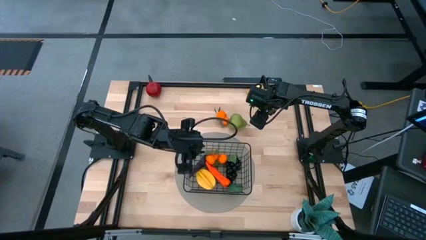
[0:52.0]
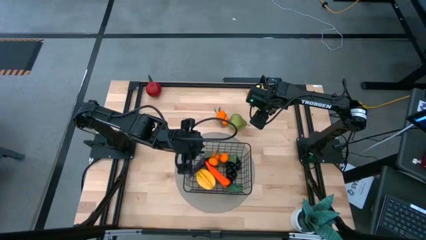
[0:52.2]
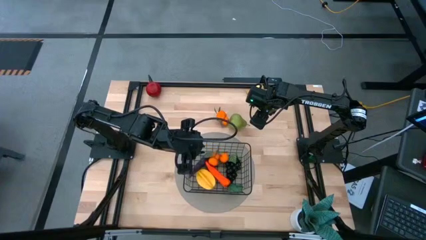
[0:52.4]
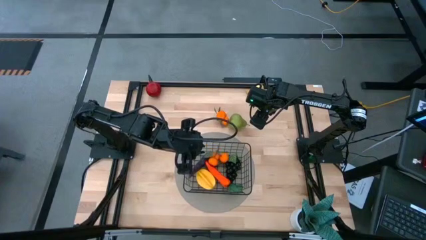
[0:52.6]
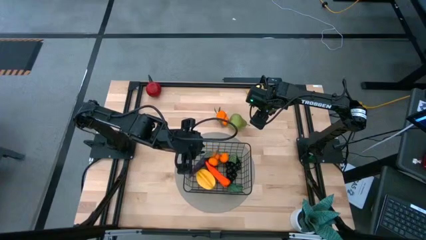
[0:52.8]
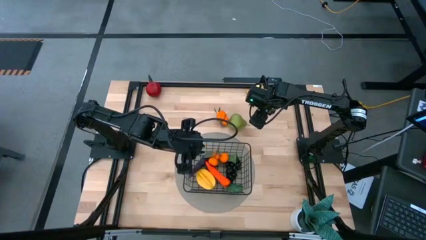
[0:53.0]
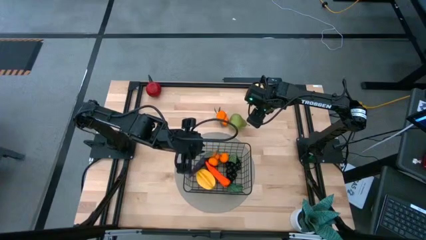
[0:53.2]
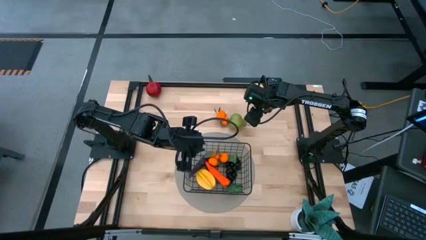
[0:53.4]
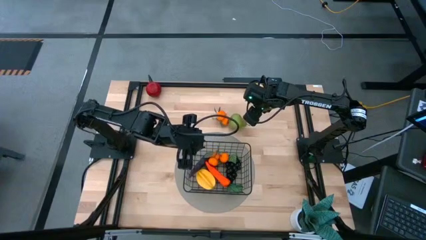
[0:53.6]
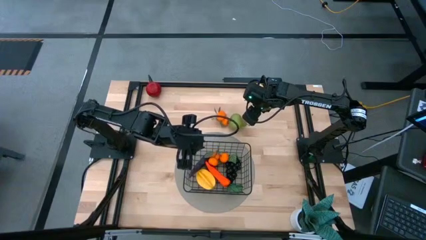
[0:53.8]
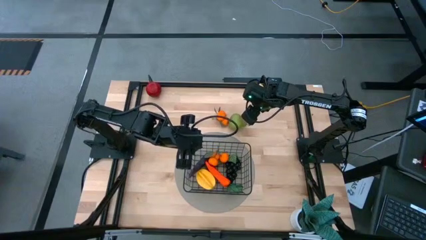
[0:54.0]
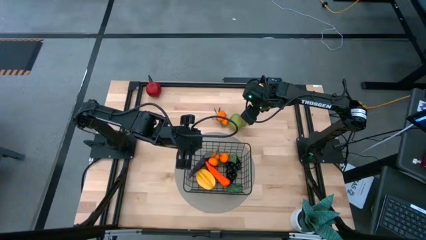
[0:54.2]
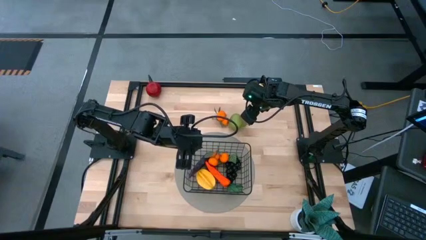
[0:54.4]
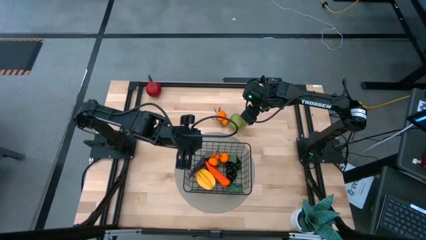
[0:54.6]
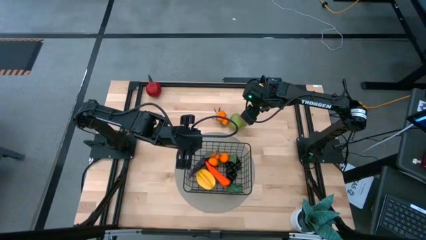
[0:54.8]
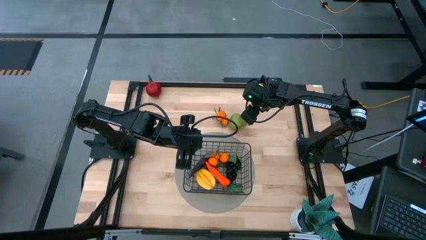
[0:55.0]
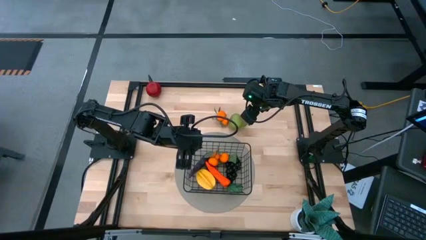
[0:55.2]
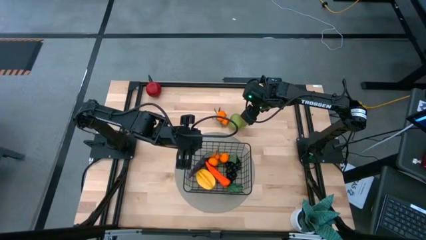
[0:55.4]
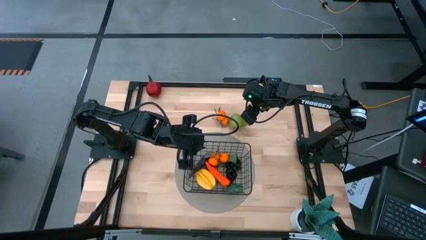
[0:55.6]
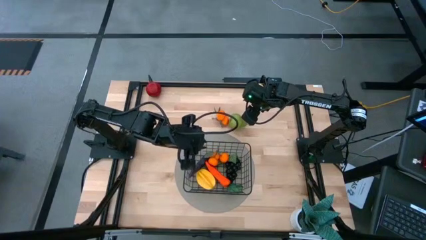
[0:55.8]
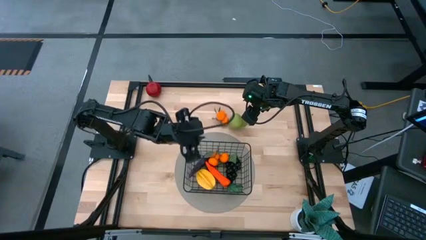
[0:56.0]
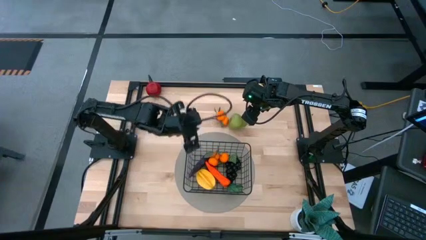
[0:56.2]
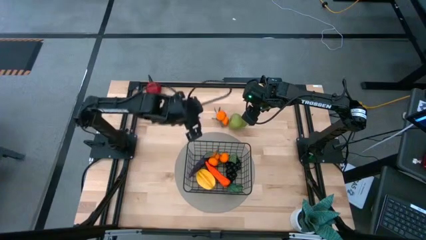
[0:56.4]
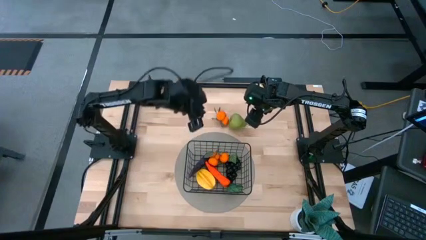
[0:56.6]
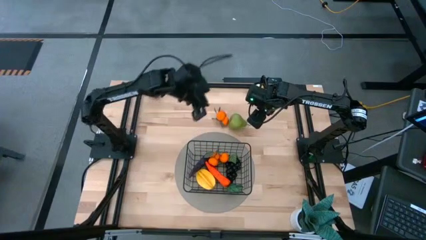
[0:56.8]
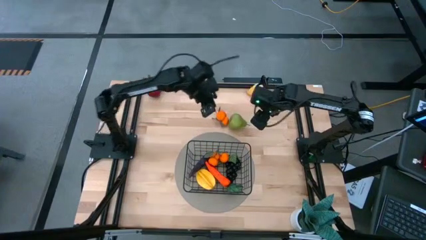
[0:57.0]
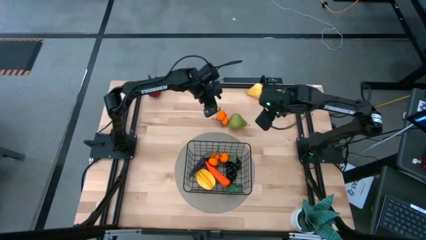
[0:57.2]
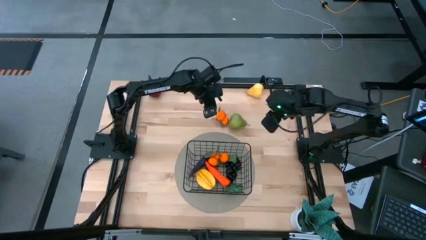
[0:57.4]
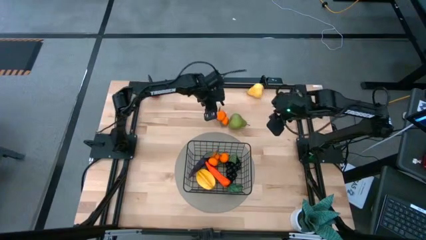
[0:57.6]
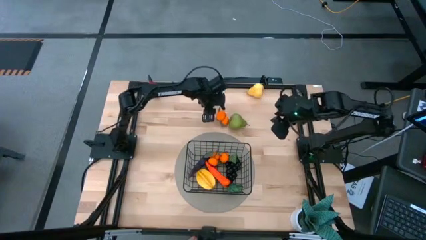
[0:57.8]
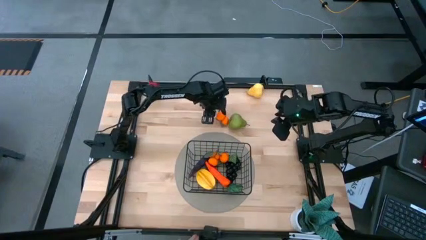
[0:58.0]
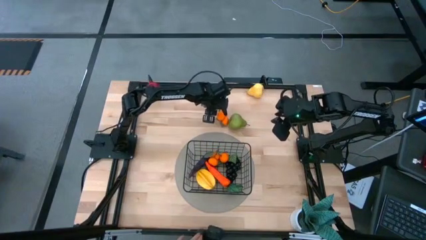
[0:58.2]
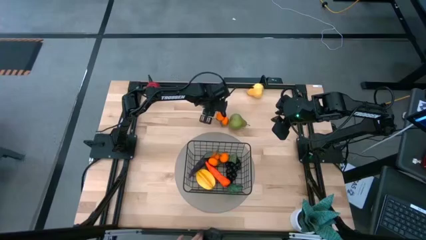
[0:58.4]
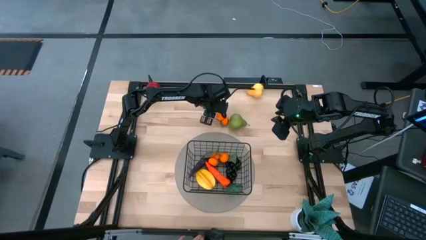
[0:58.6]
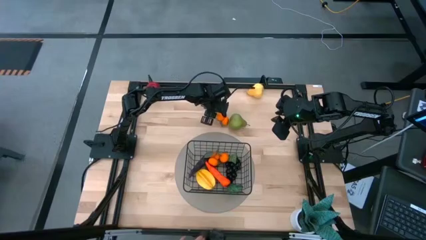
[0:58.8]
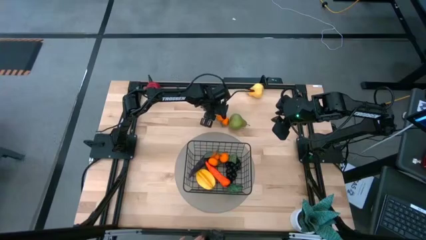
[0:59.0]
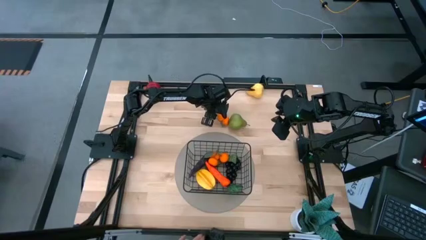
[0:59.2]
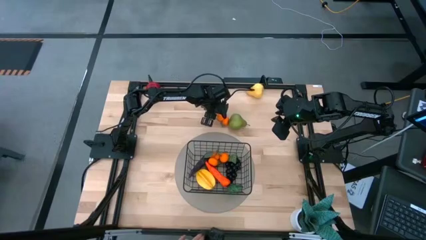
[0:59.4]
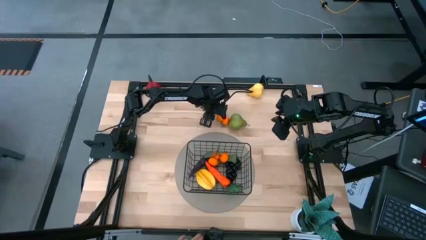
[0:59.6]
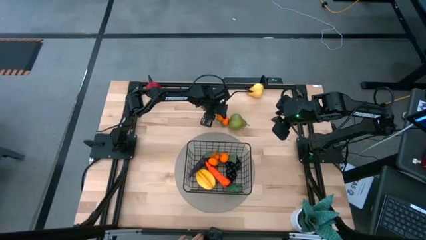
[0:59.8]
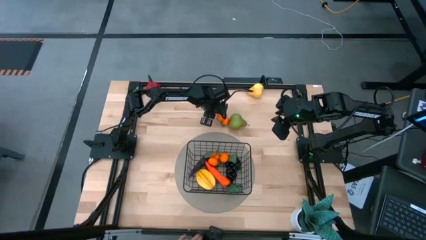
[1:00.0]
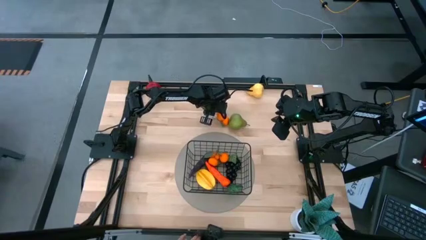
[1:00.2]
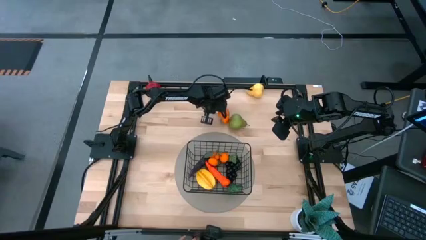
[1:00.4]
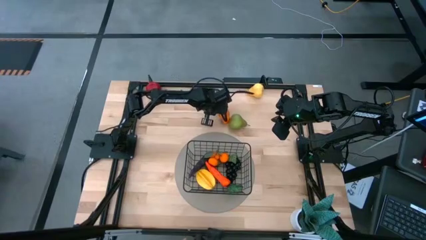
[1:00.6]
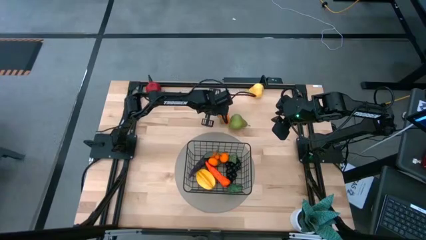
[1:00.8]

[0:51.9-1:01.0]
Task: Build produce basket
Put the oranges into the wire basket

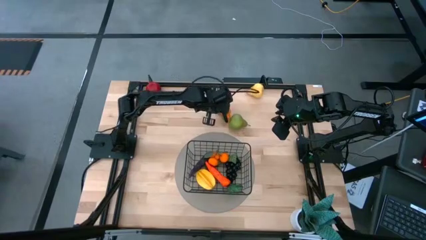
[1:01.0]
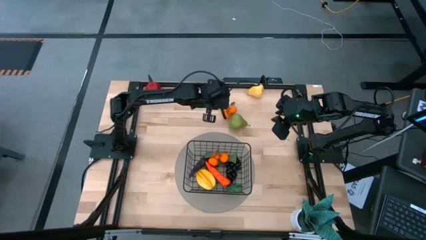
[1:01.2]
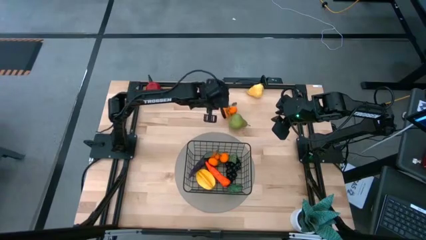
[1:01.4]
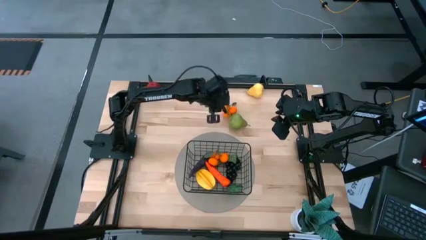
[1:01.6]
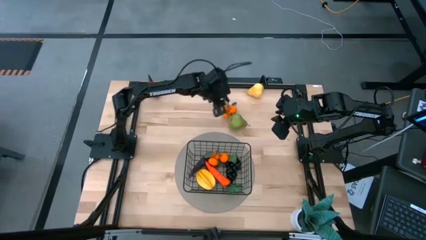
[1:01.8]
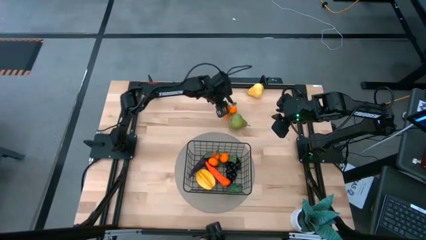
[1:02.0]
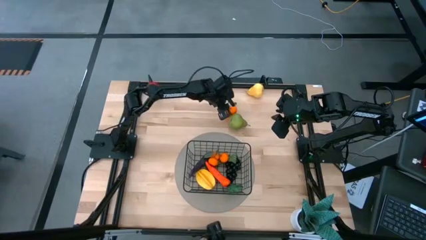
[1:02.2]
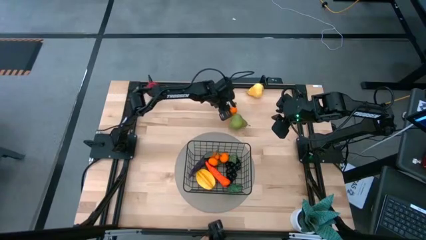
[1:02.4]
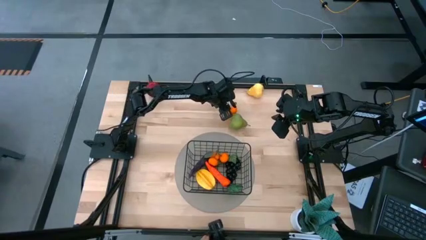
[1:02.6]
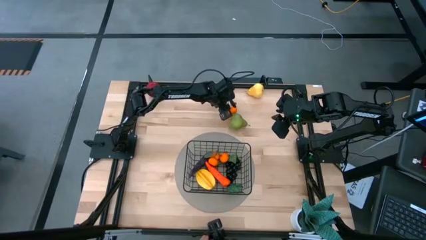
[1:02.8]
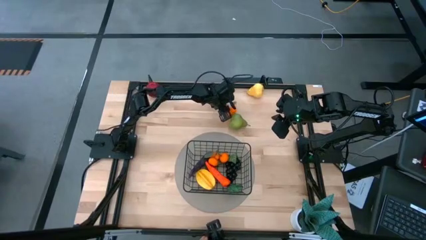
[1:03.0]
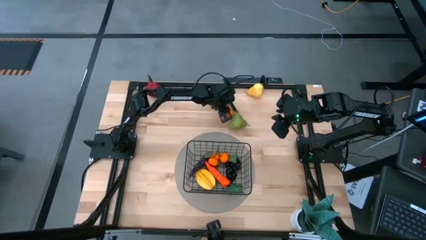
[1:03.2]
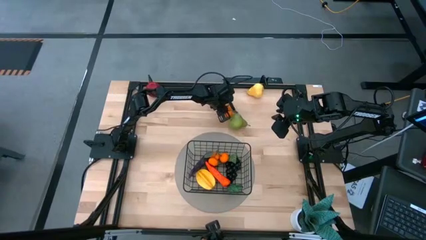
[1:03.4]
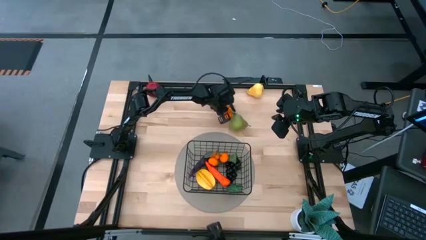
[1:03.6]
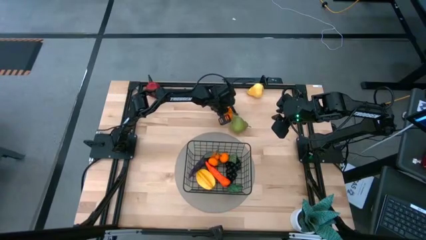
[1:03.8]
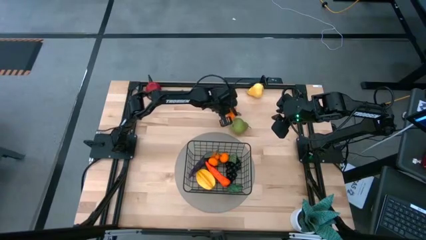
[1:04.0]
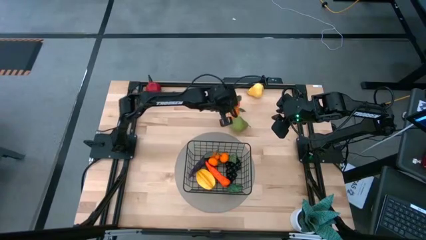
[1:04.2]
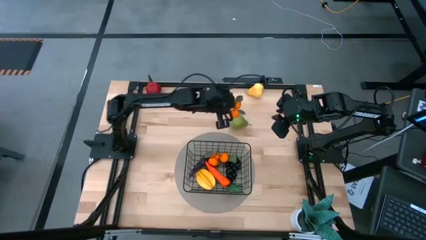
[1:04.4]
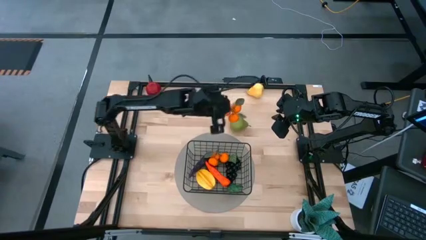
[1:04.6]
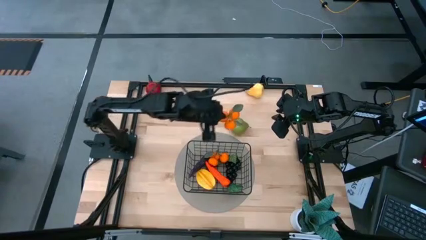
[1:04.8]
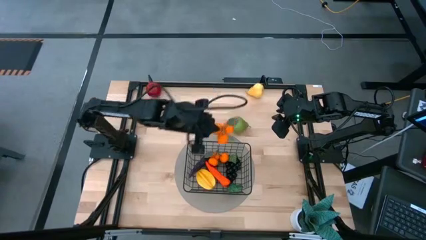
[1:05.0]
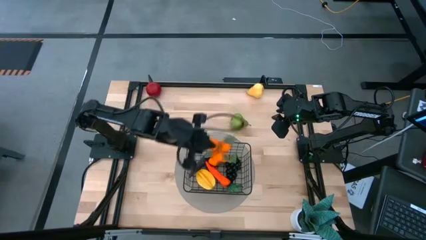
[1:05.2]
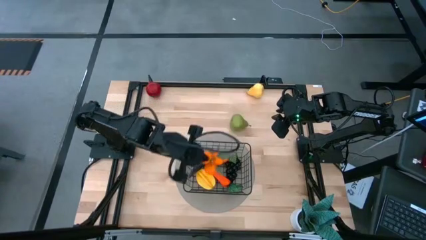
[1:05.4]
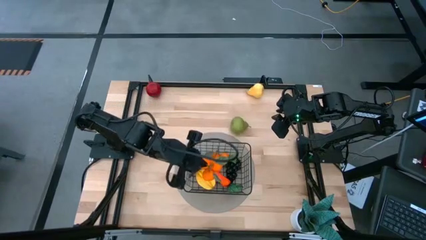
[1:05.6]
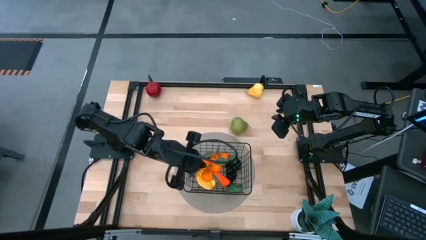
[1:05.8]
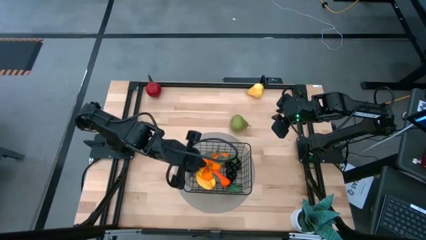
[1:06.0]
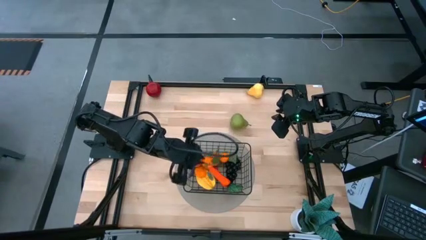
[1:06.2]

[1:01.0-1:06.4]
Put the oranges into the wire basket

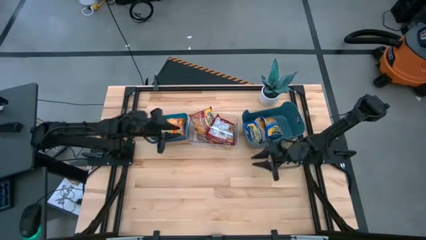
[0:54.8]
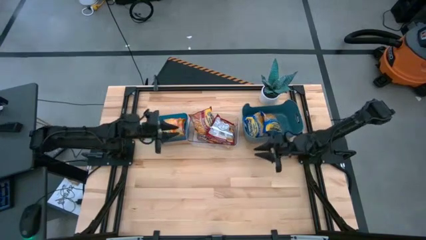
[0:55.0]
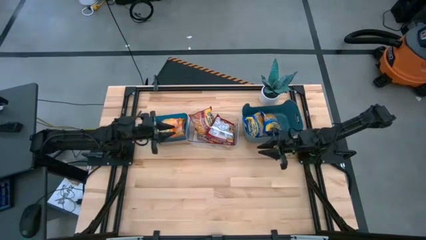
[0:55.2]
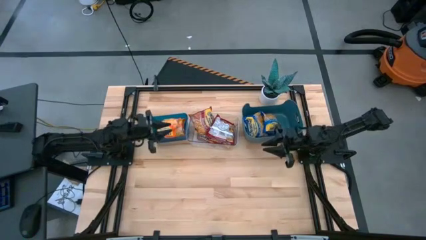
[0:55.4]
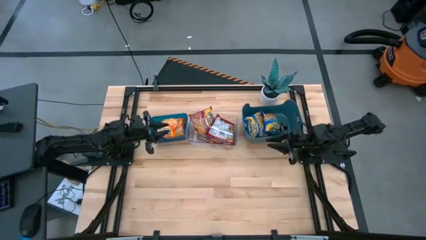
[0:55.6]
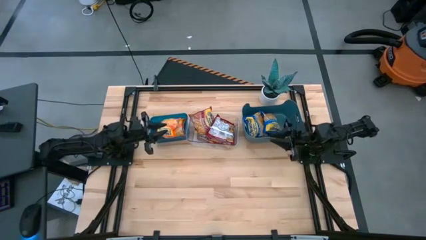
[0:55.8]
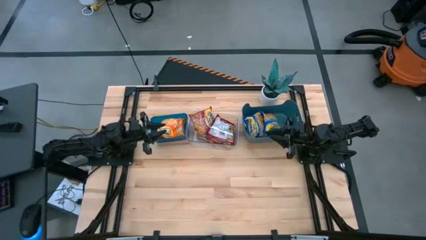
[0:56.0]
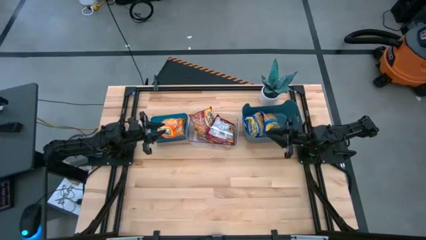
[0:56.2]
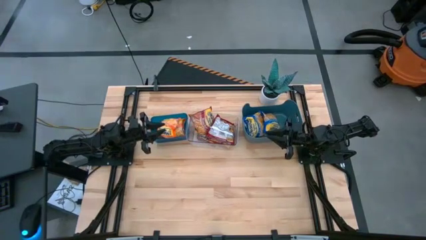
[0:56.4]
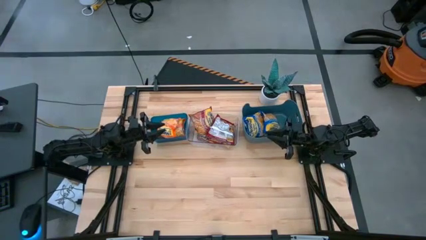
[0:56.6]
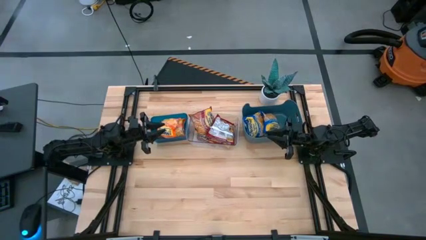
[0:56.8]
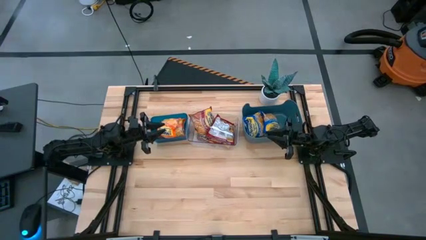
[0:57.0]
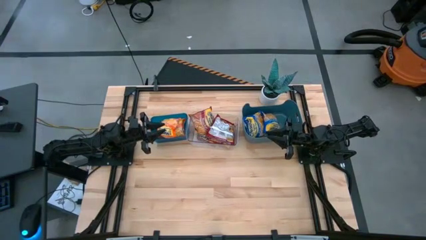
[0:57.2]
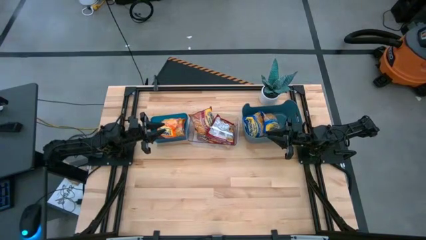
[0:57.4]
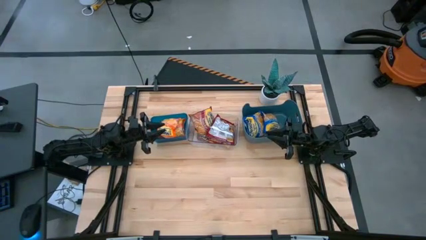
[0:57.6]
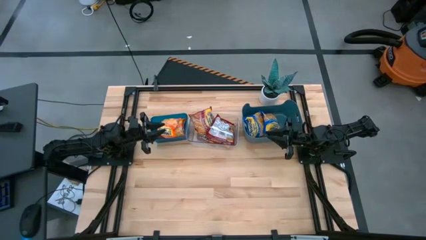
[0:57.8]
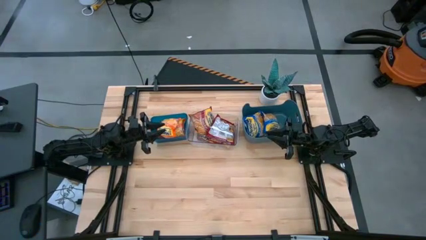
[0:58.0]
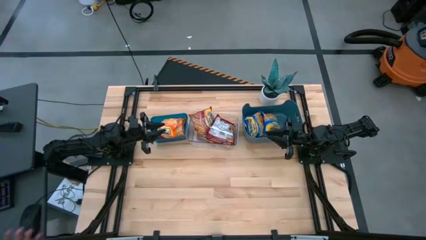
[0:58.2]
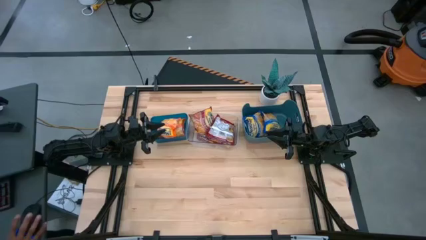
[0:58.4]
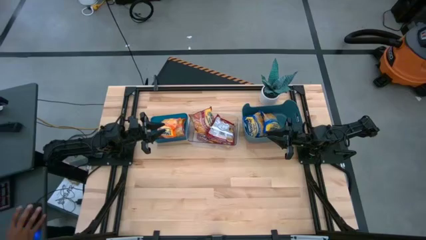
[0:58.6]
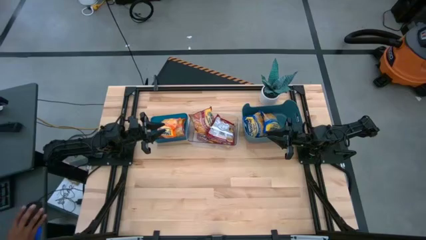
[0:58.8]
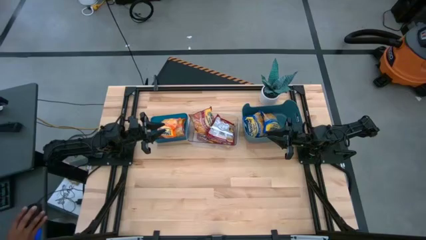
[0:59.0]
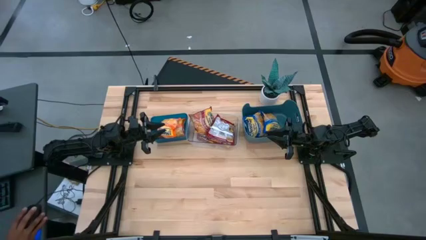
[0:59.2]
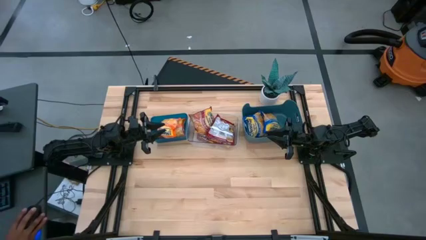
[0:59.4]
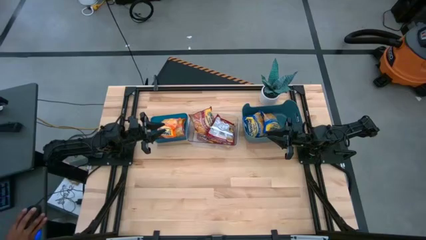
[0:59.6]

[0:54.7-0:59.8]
Task: Sort Maruchan noodles
Return to Home Position
